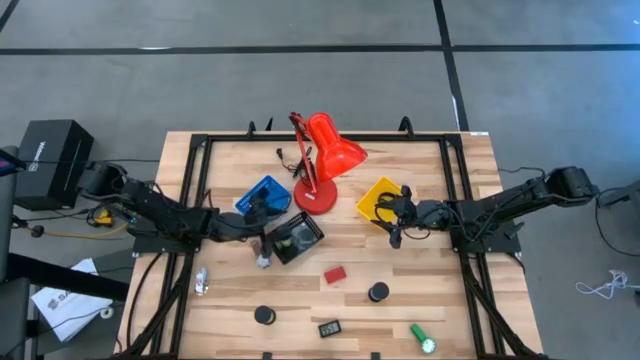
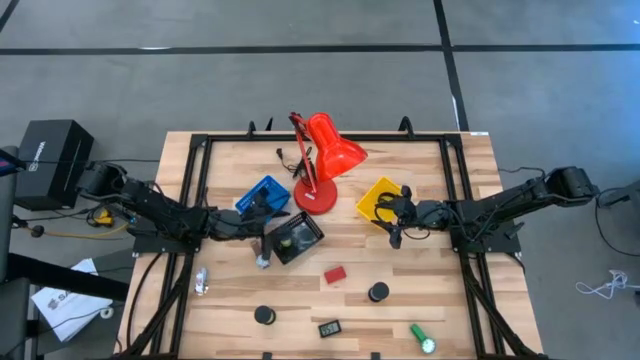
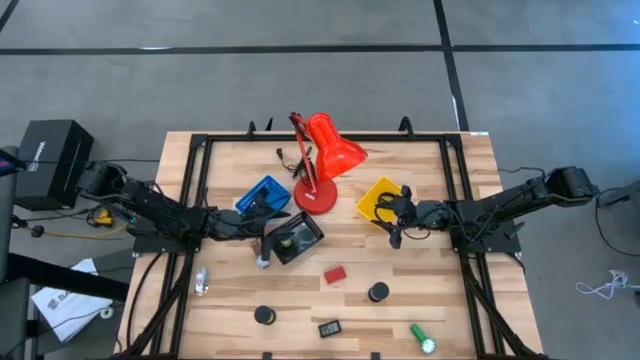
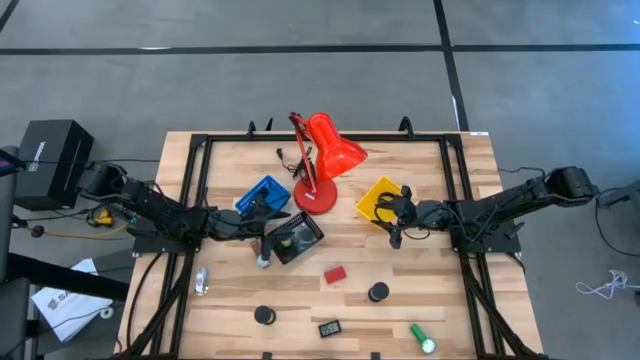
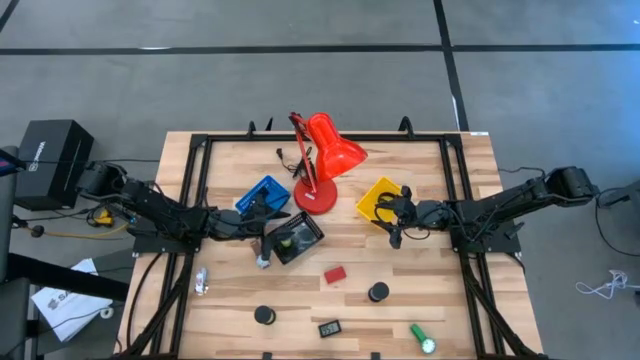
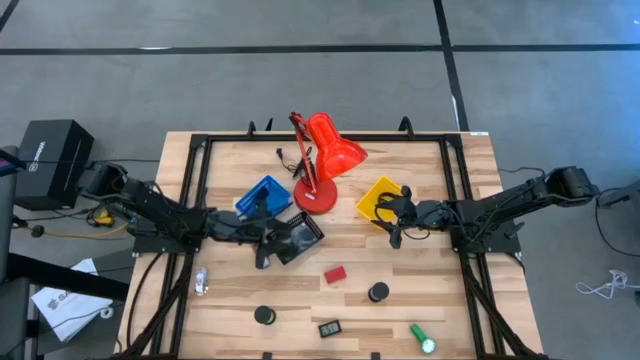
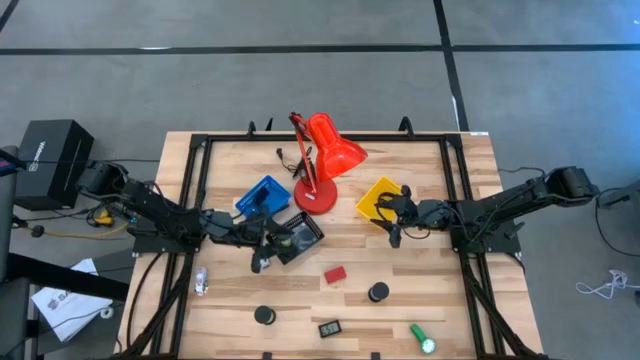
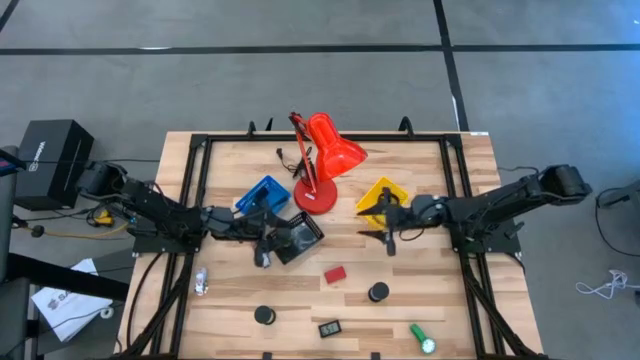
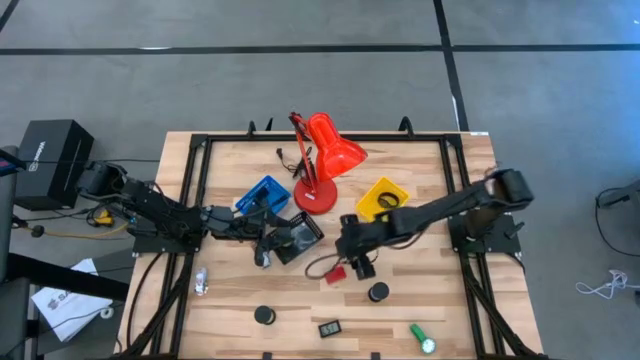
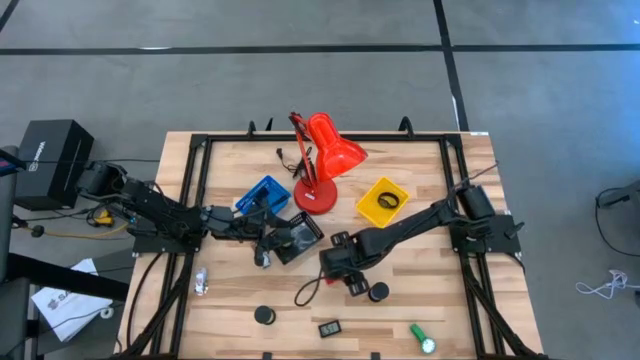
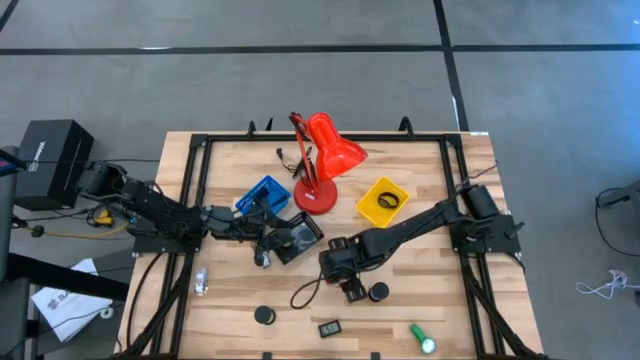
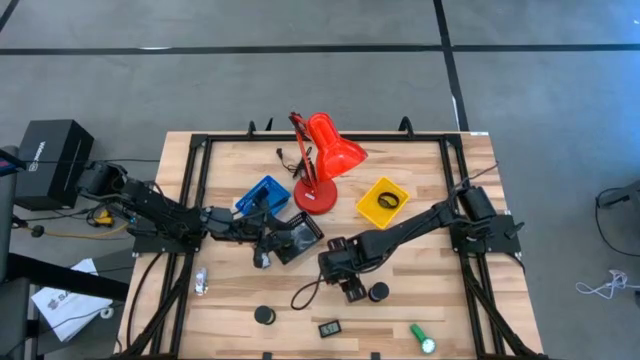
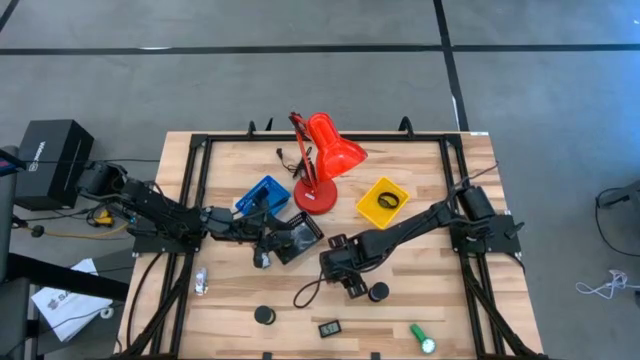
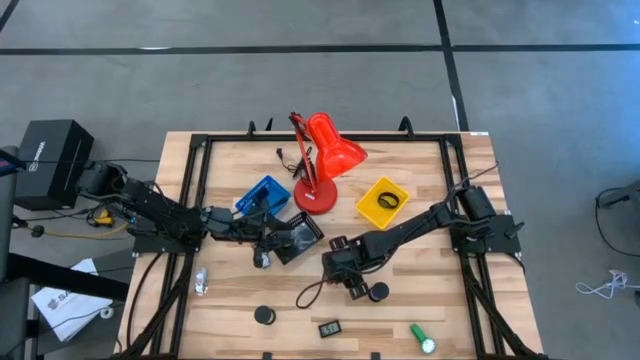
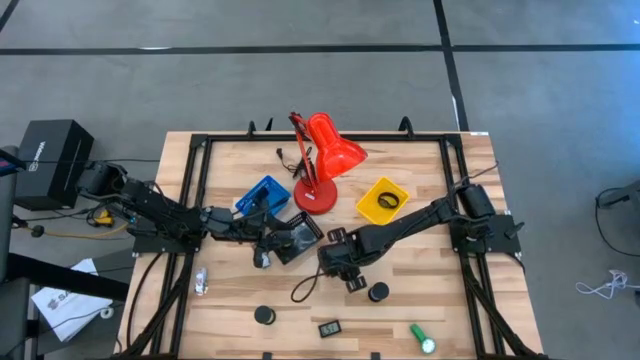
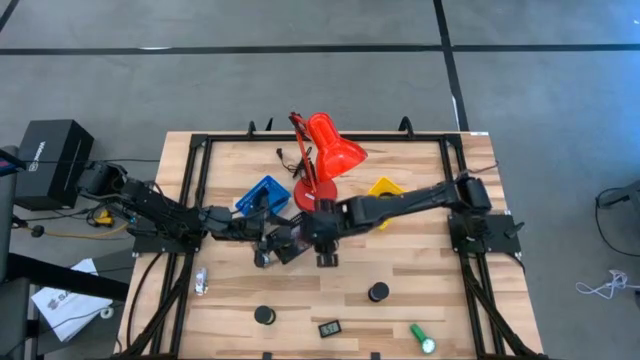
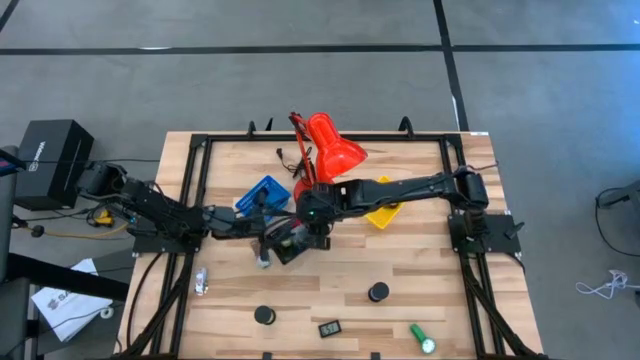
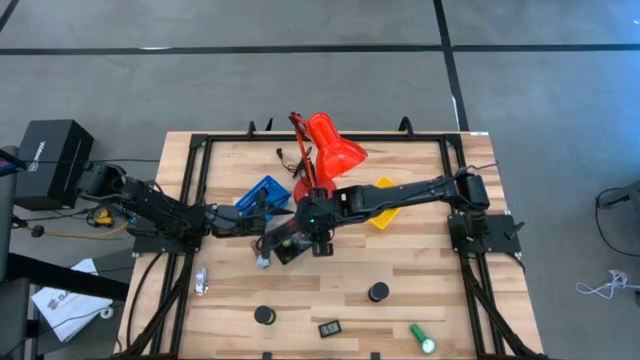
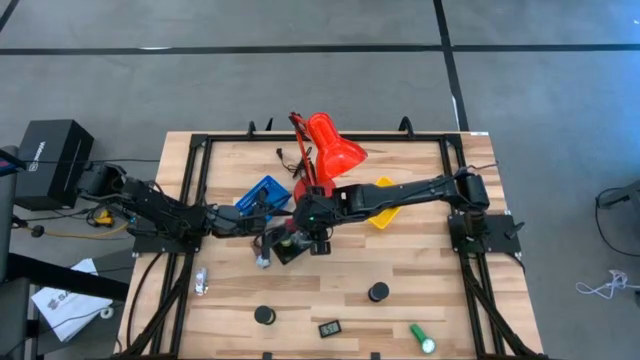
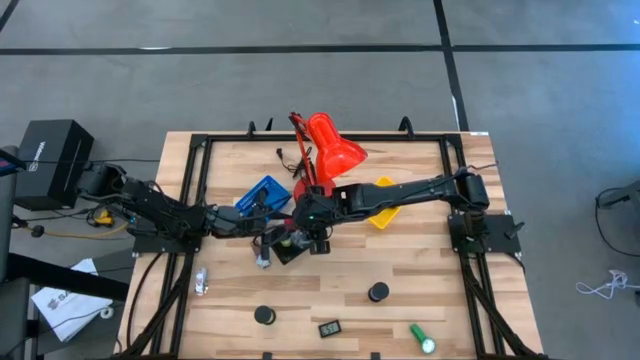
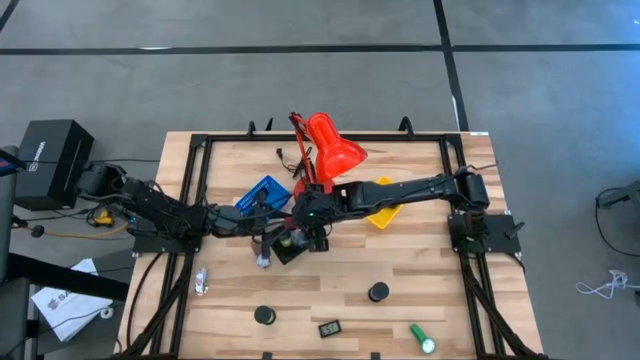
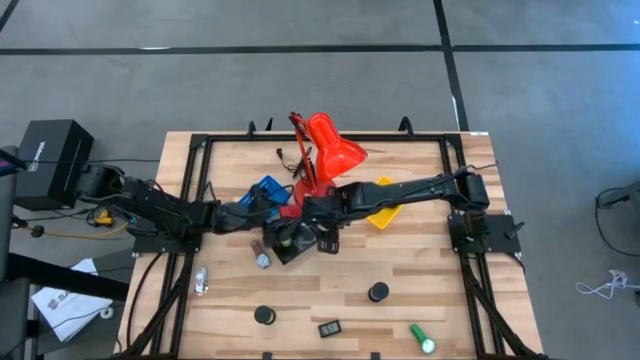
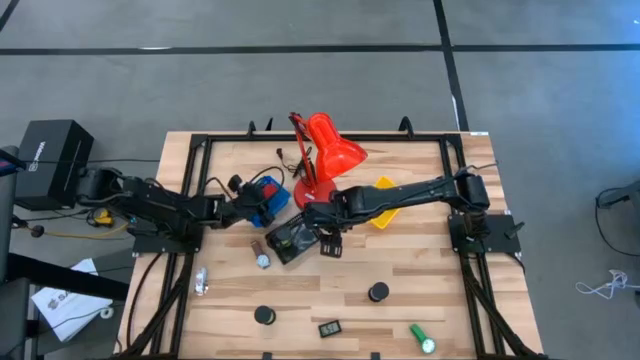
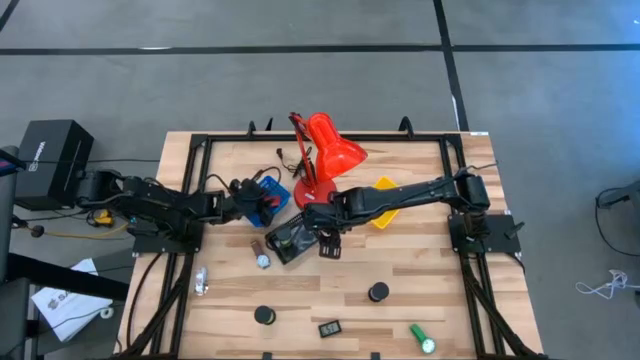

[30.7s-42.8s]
Task: Pick & Place Office items
Put the red timer into the blue bin

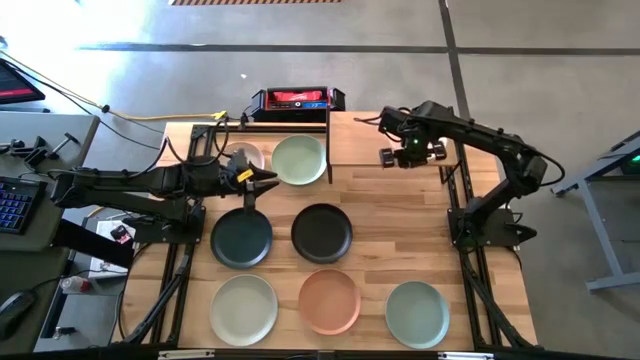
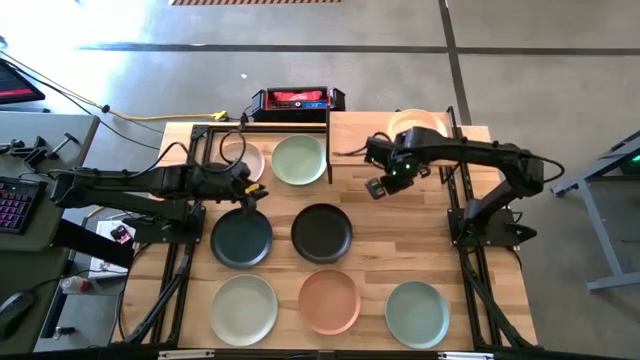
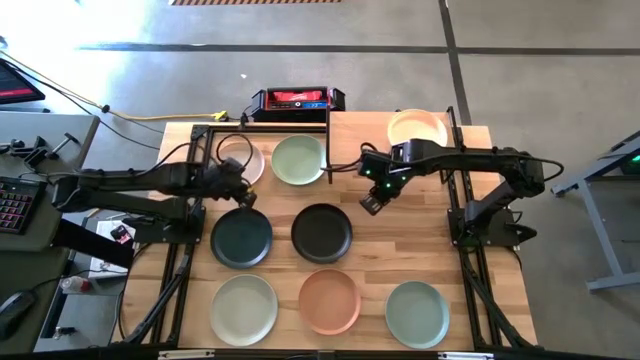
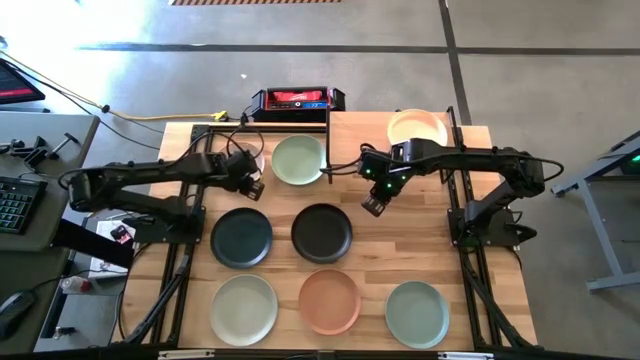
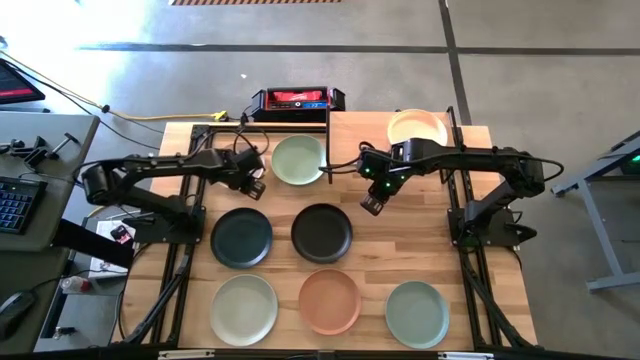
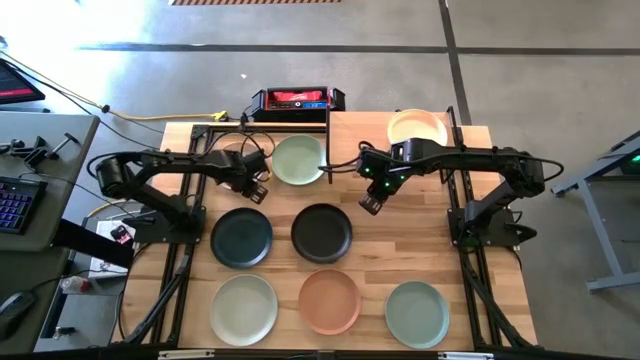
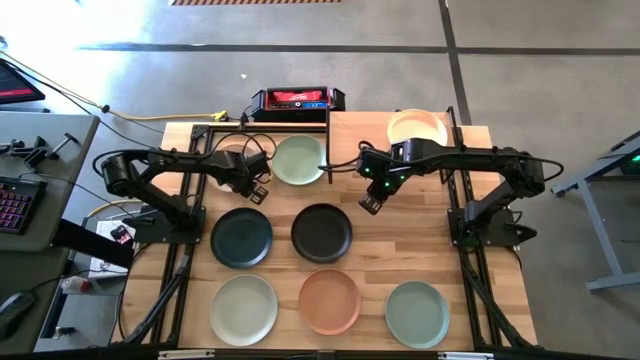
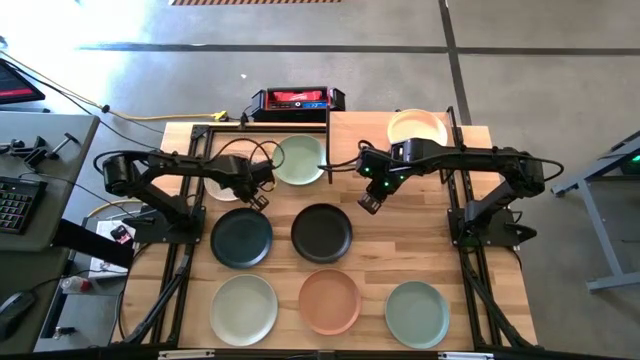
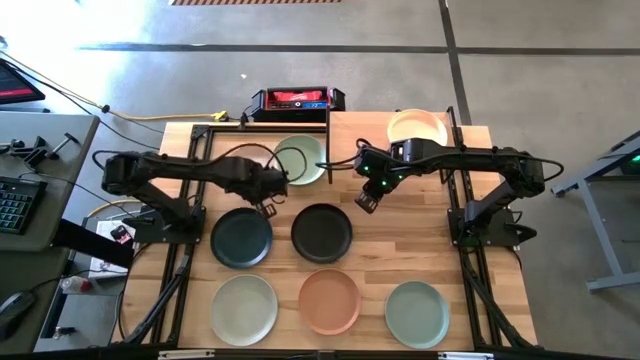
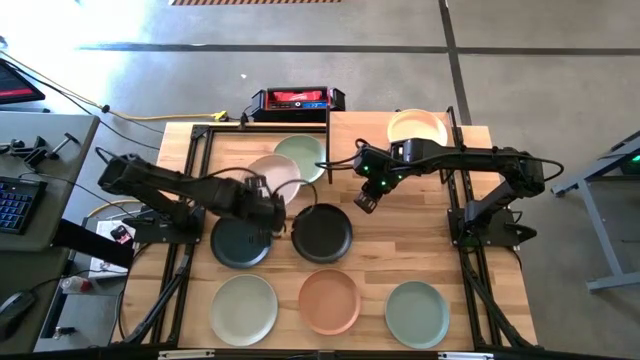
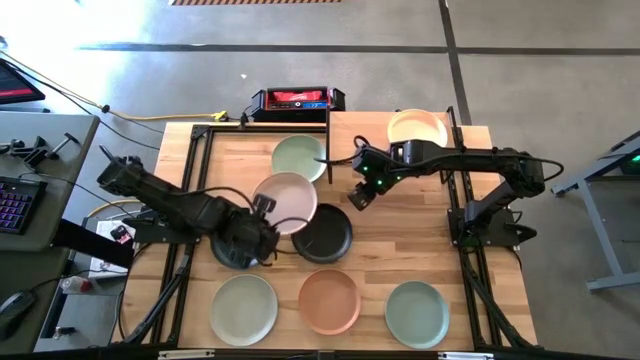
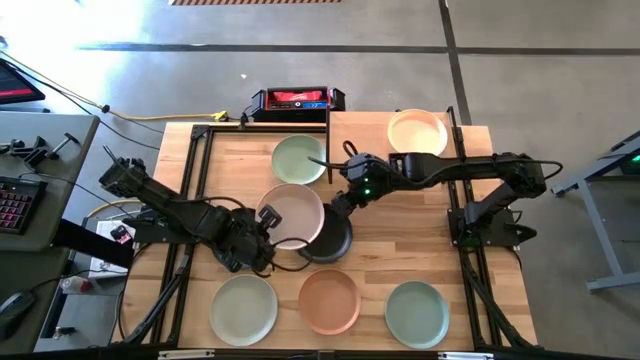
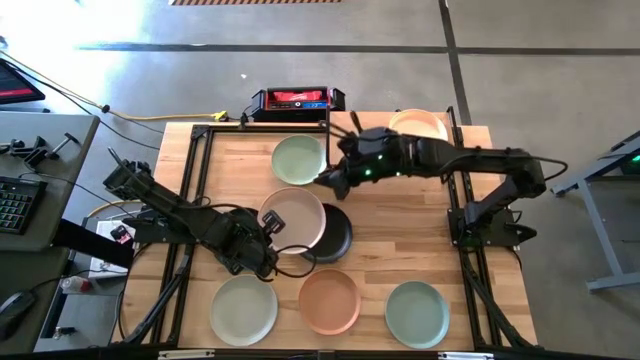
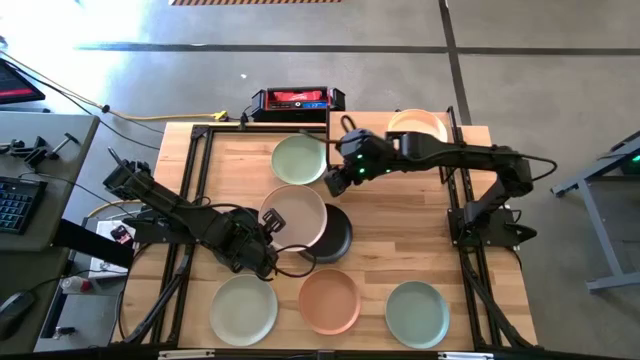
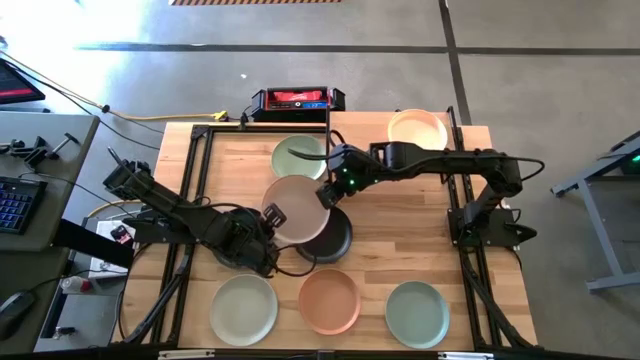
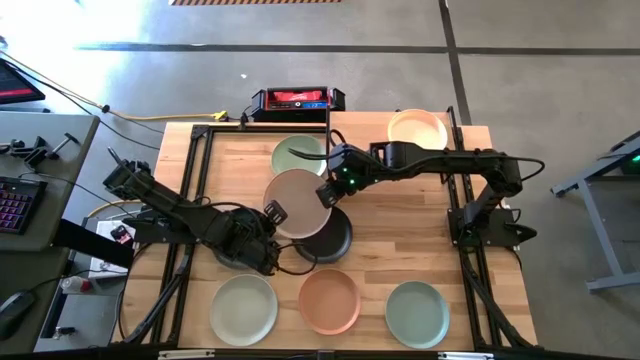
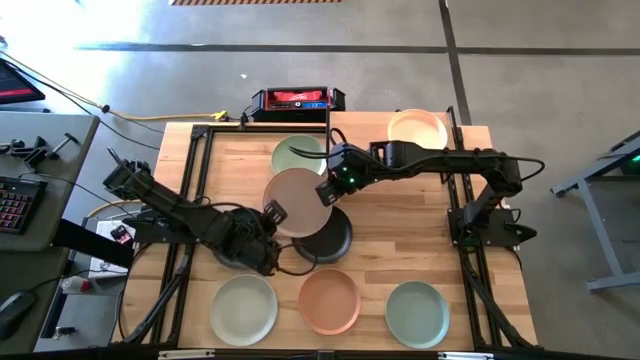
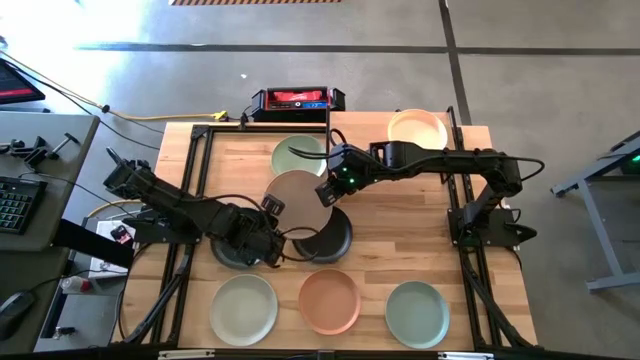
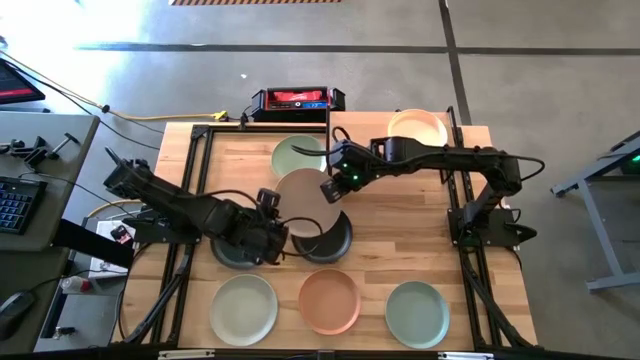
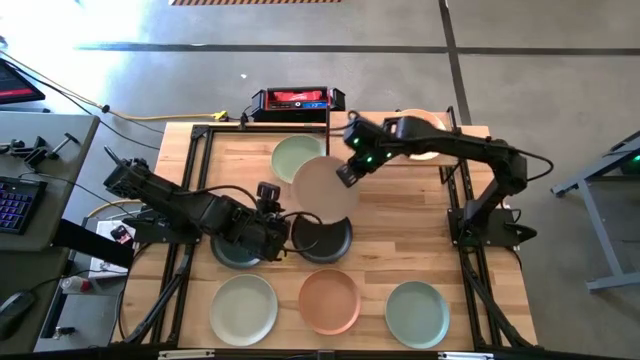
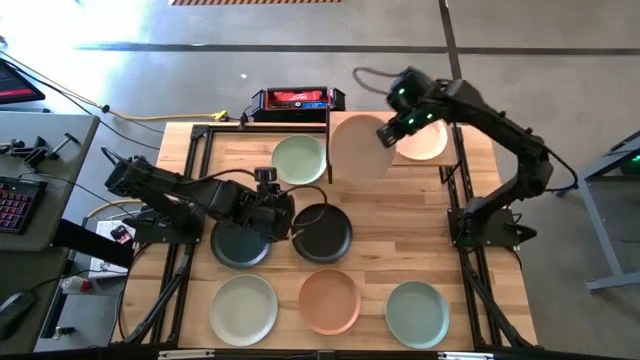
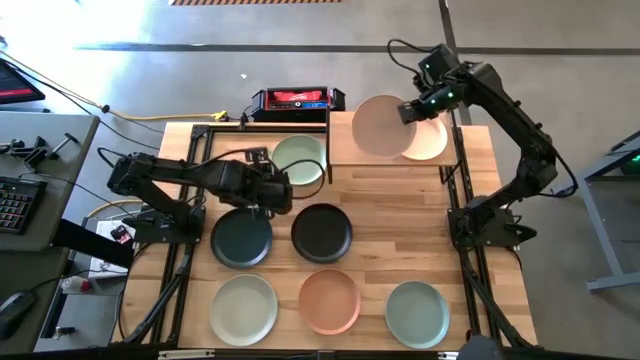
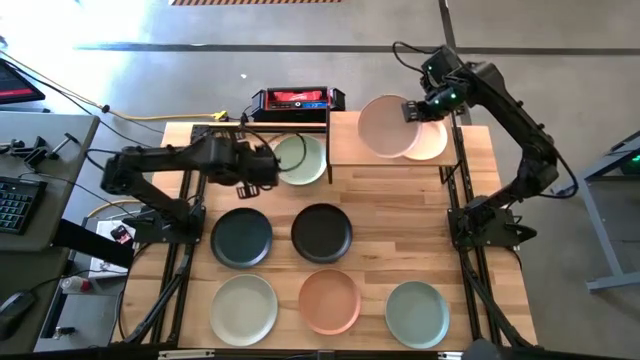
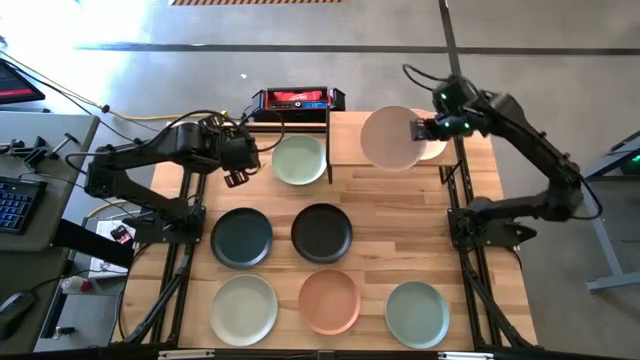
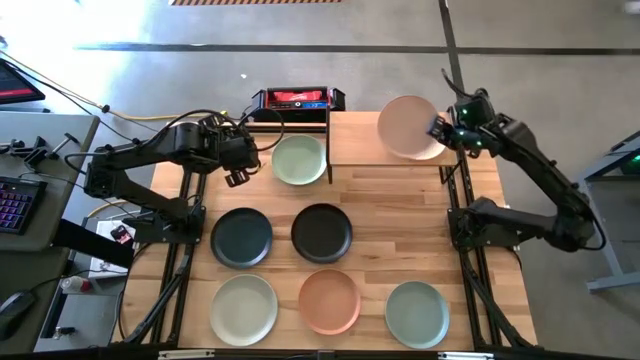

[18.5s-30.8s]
Task: Place and stack plates onto a shelf
Stack the white plate on top of the light orange plate on the shelf
